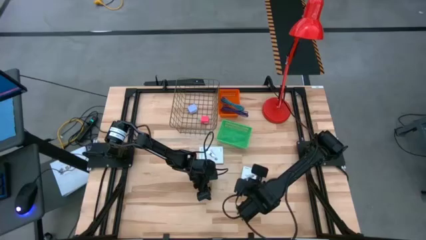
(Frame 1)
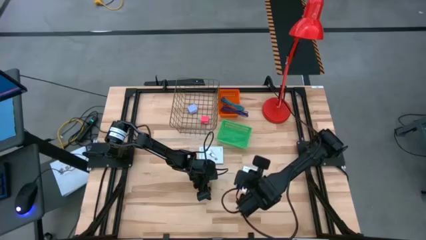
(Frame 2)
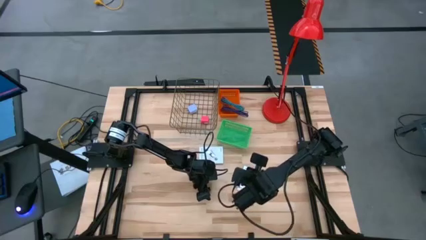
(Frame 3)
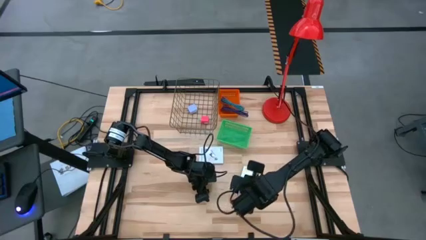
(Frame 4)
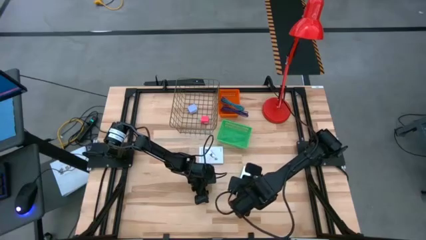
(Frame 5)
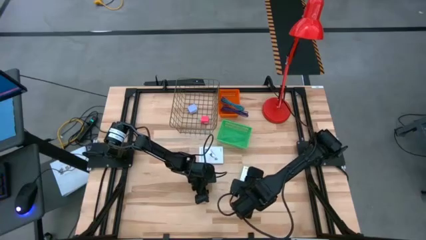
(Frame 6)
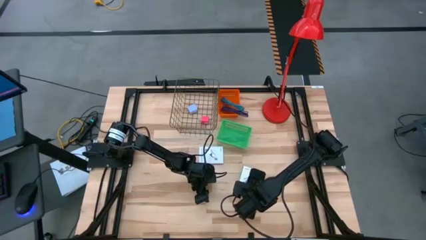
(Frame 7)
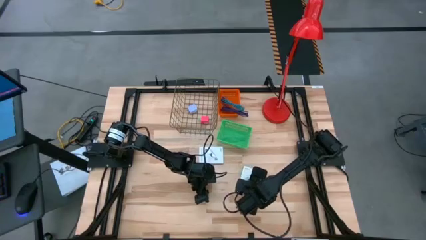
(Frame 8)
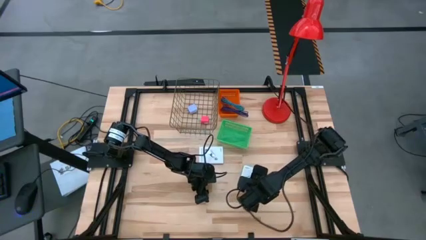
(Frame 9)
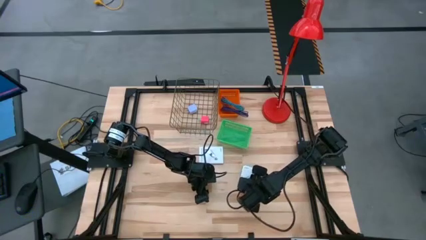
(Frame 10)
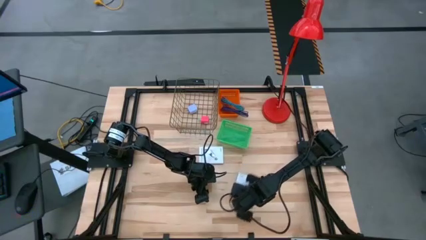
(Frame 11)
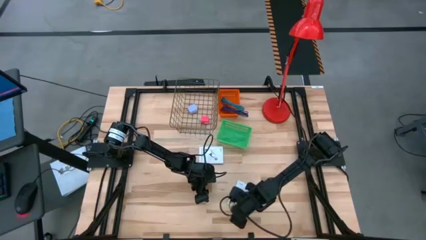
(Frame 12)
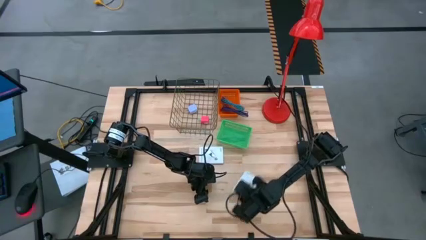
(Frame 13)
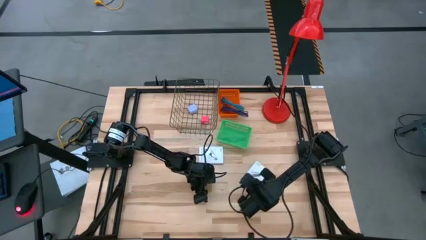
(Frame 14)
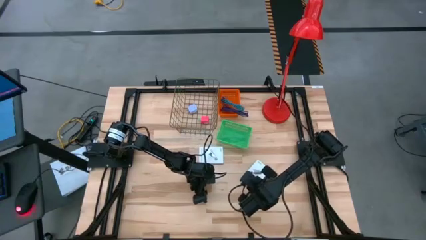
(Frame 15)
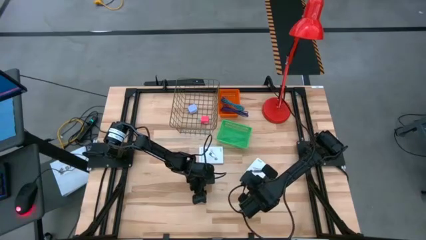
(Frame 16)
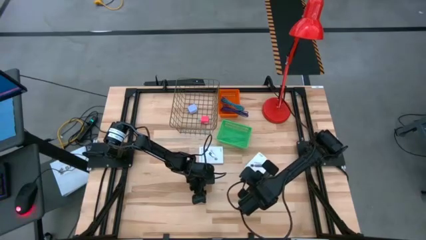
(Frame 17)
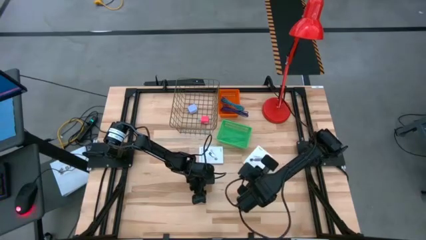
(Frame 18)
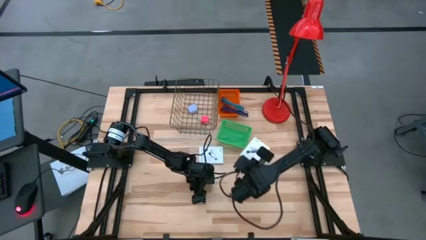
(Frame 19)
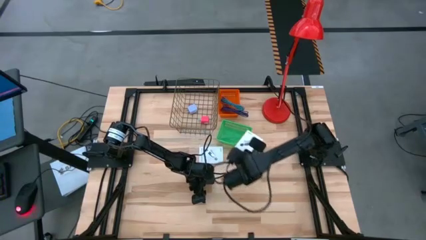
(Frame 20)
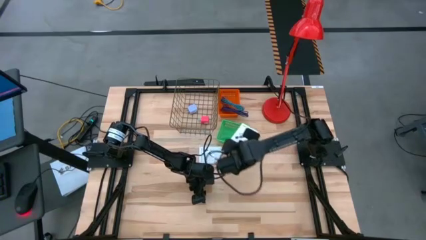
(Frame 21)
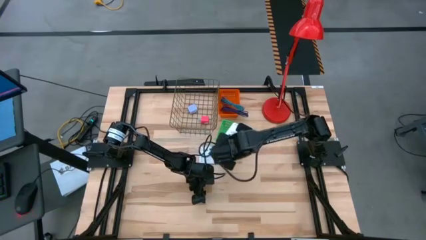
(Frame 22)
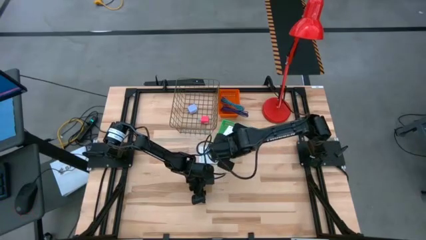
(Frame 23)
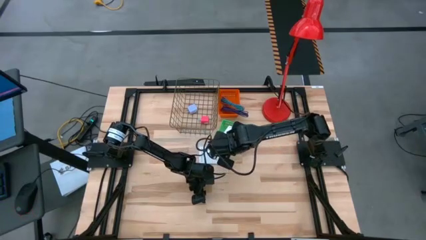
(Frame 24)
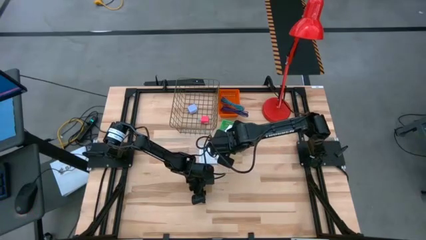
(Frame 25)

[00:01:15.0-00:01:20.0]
Task: Pick and place items into bin
Put the top card reader box into the green basket

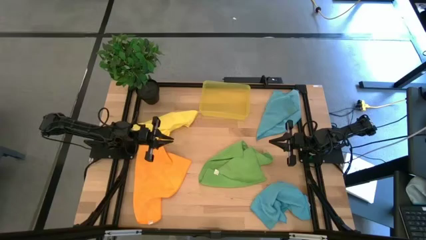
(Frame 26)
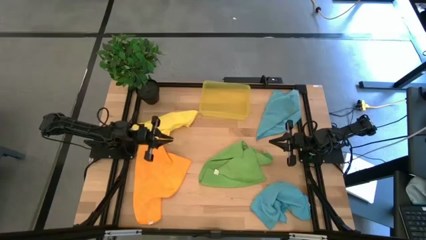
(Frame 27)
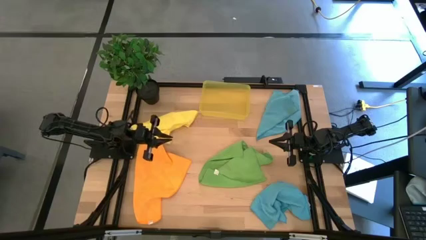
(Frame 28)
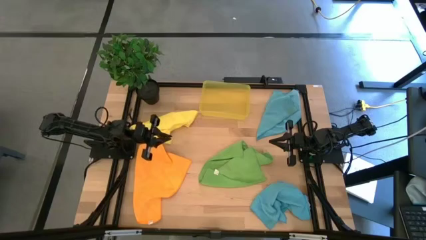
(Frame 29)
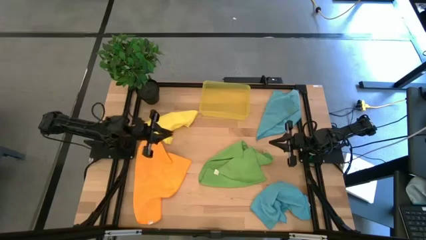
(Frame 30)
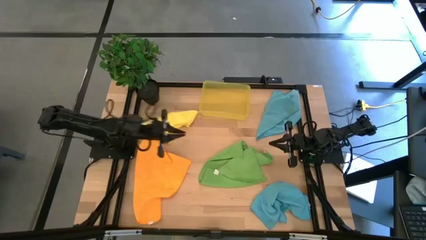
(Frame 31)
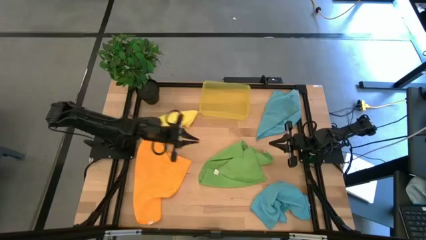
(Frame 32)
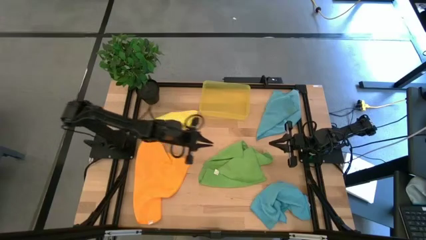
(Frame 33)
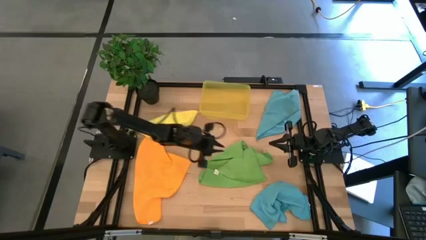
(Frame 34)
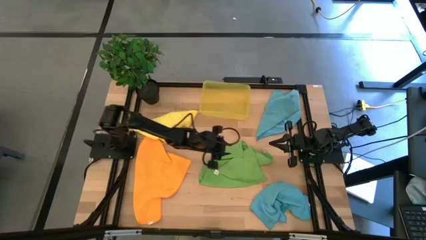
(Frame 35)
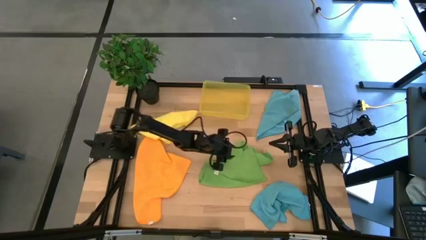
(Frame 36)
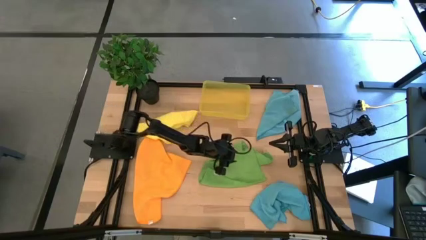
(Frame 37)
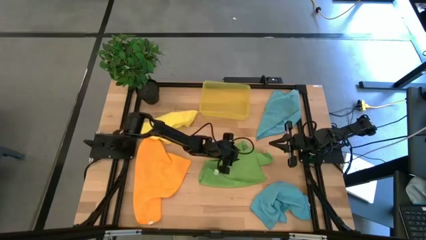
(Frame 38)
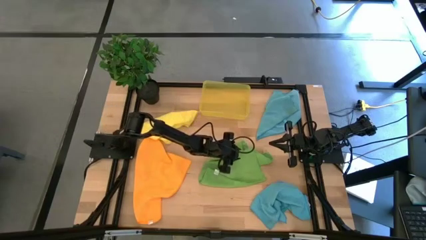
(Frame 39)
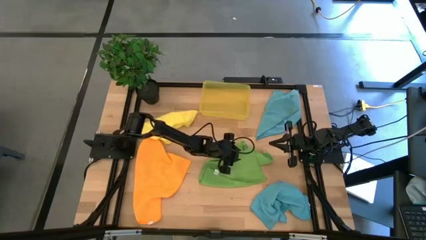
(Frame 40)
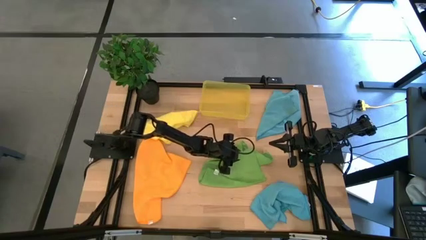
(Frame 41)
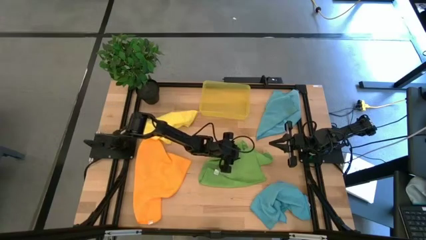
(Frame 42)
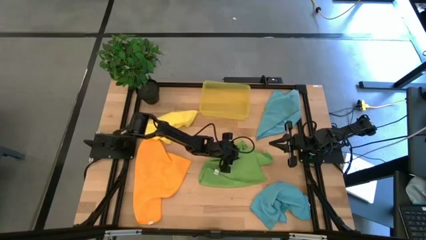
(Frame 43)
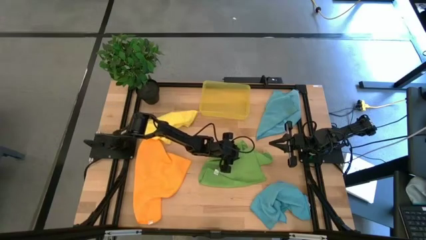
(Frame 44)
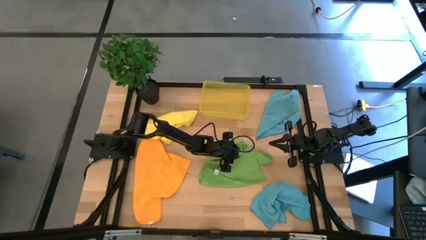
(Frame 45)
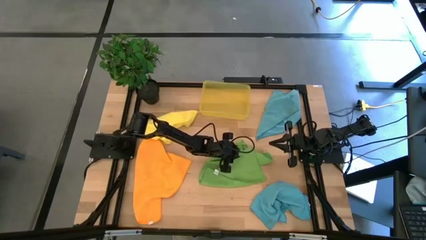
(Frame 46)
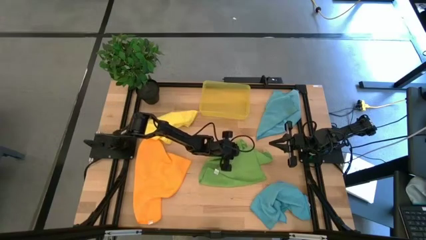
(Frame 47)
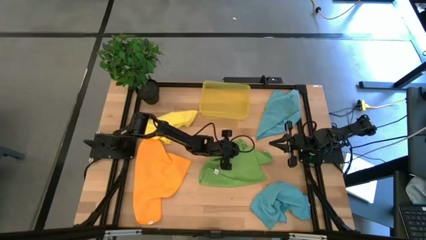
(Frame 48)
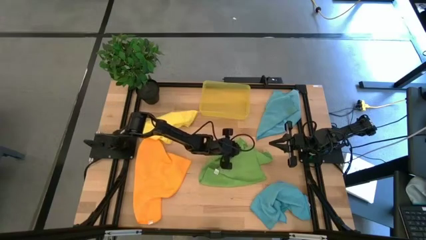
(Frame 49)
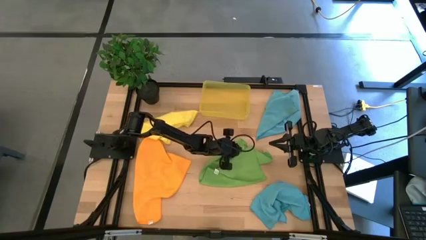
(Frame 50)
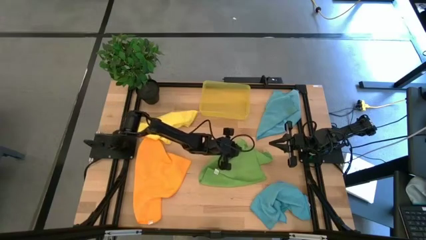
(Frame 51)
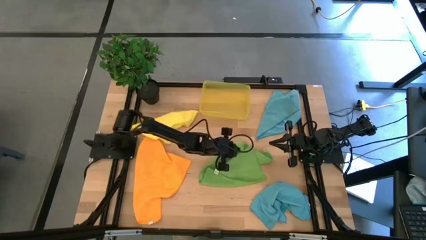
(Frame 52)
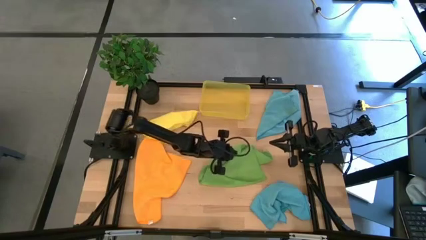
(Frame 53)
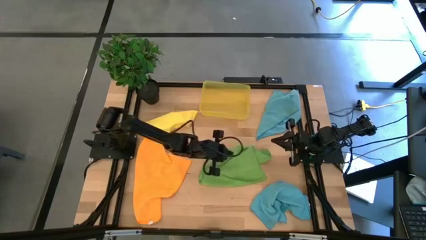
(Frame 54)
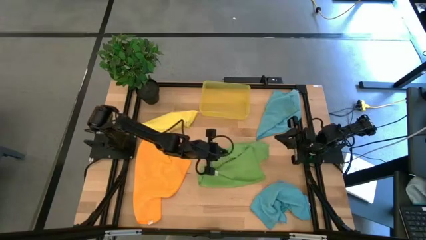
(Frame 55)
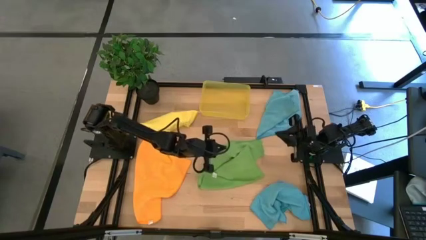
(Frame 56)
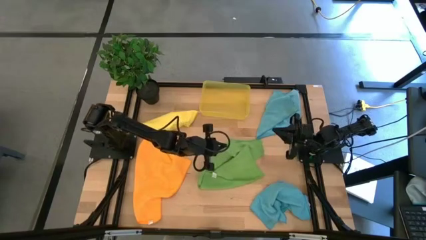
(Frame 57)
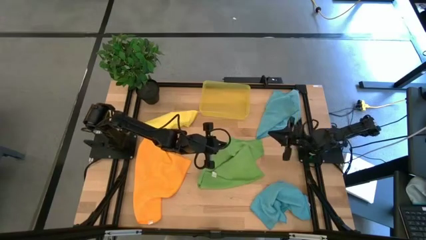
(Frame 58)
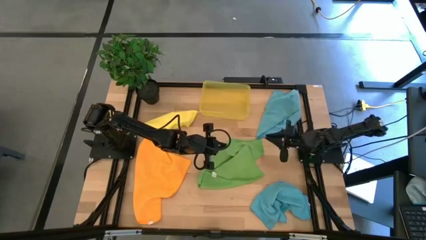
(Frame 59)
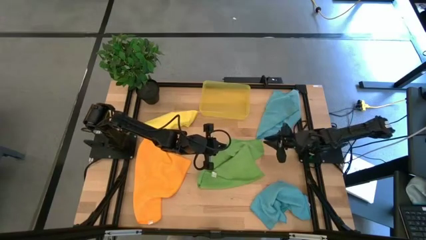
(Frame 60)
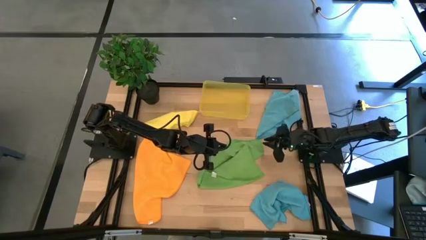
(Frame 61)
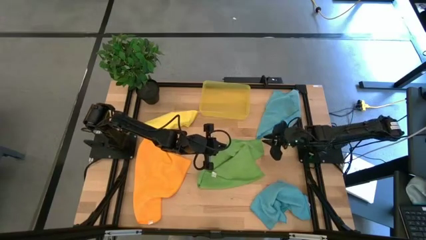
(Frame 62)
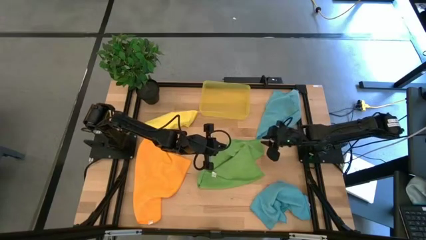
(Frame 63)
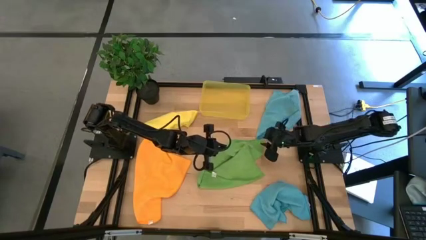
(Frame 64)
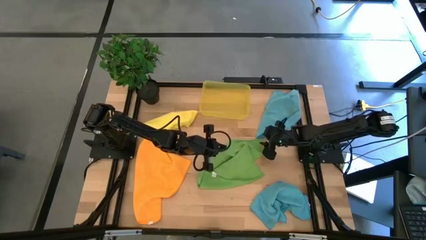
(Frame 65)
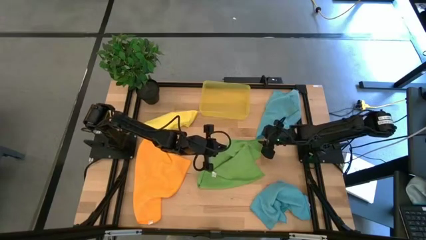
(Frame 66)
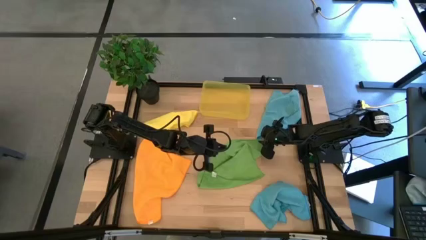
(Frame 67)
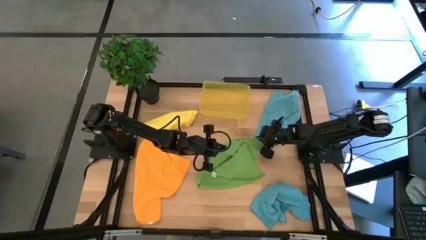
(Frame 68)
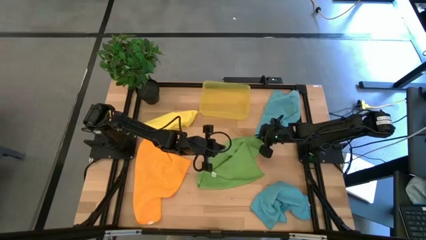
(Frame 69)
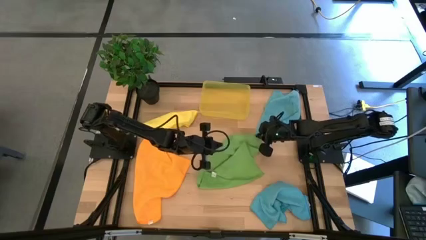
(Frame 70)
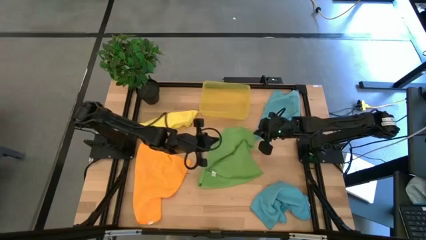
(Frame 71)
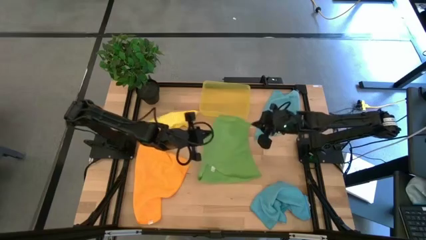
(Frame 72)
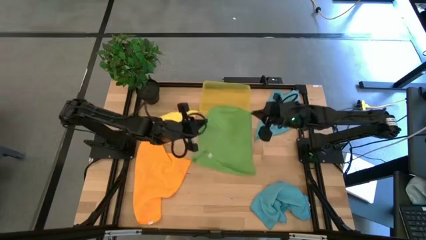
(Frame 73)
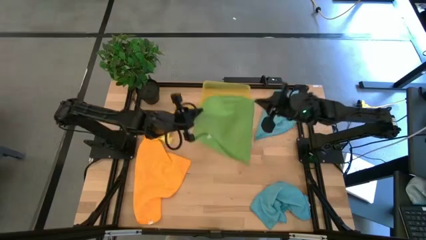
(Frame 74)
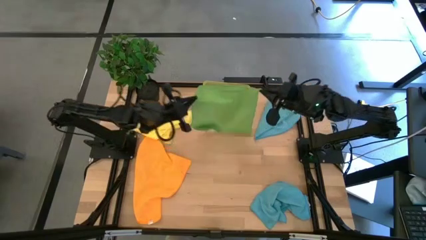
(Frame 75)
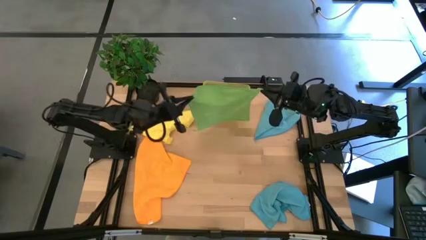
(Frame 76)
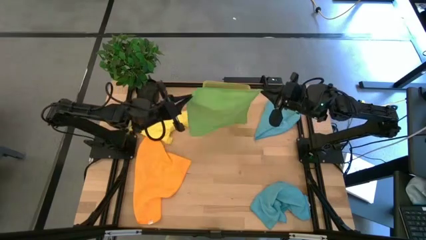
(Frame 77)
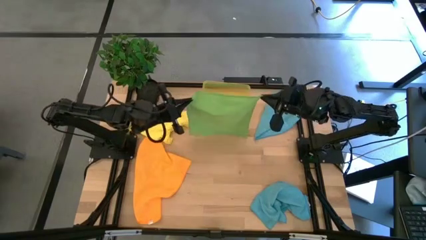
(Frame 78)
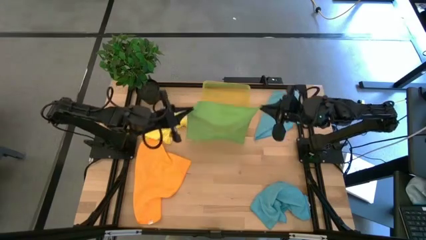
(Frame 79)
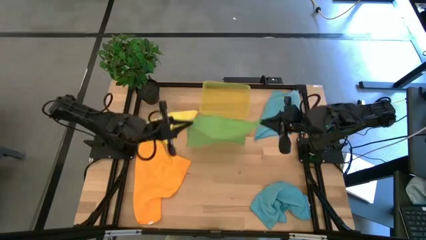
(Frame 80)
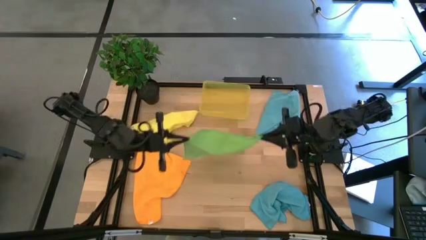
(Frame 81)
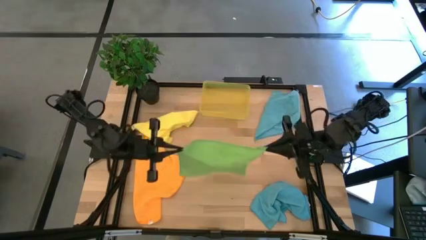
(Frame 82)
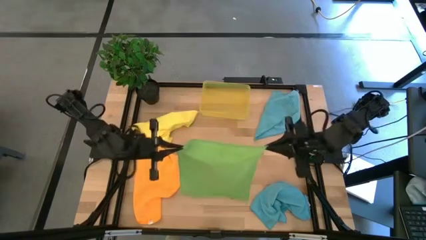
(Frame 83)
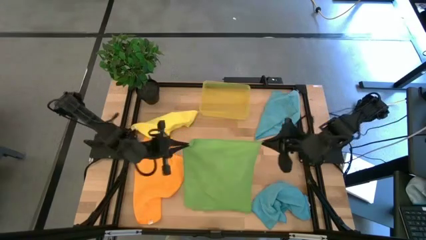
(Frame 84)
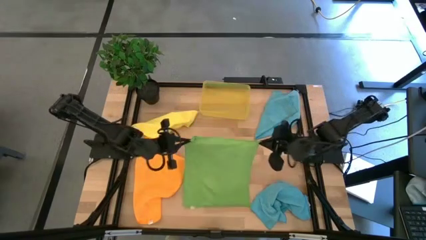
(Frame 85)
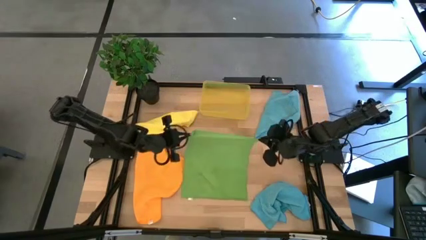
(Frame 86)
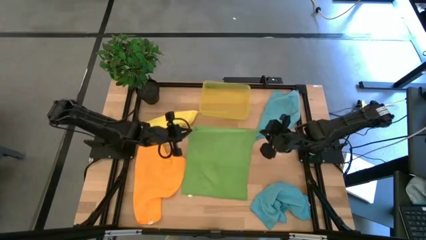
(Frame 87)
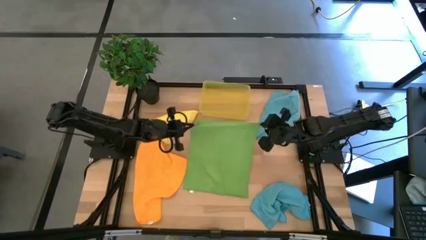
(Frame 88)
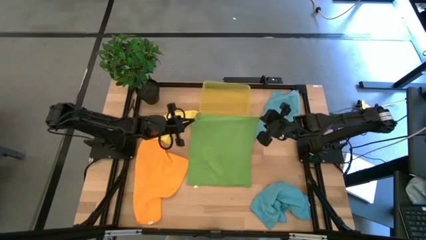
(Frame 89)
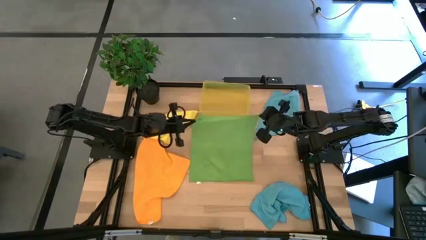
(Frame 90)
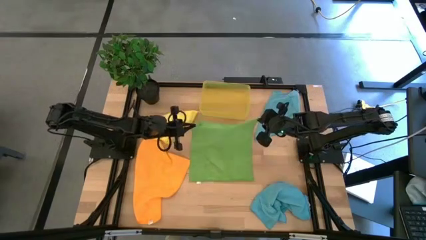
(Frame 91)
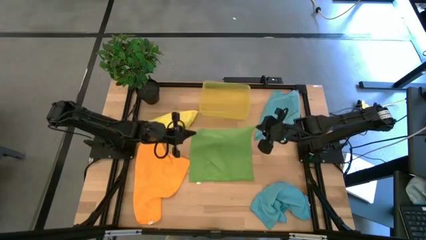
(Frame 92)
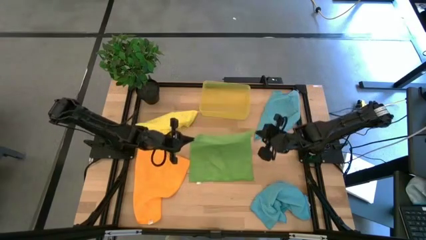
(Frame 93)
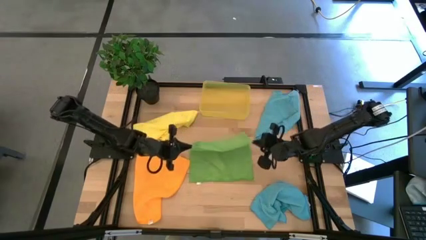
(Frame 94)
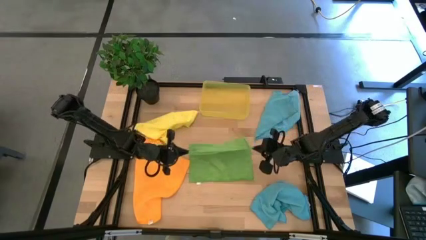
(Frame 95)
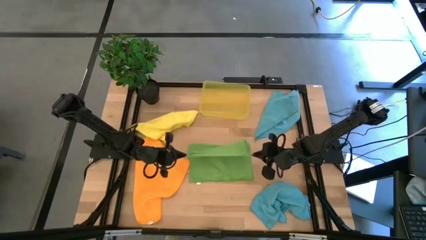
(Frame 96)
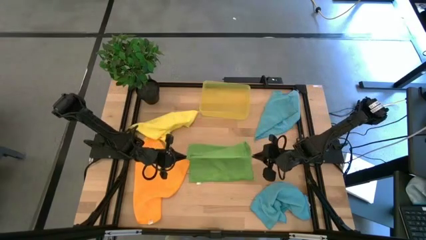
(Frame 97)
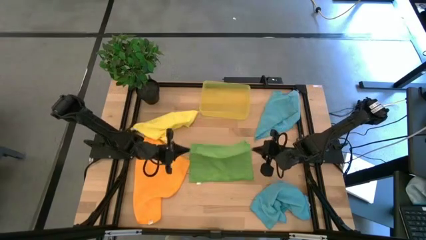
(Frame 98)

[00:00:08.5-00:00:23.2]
Task: Fold microfiber towels
Fold the green microfiber cloth
